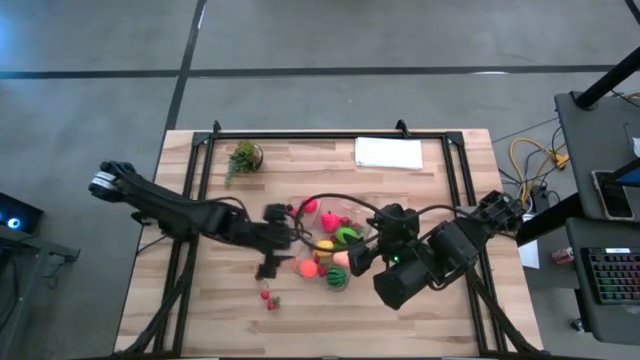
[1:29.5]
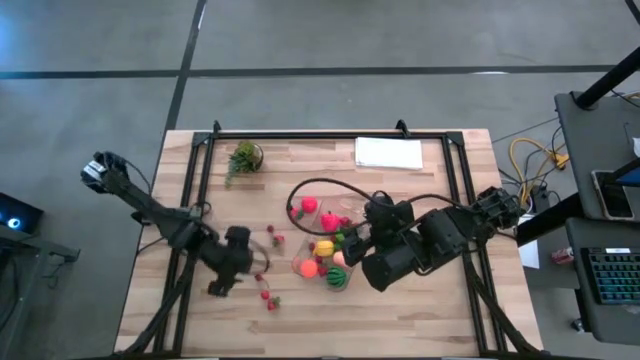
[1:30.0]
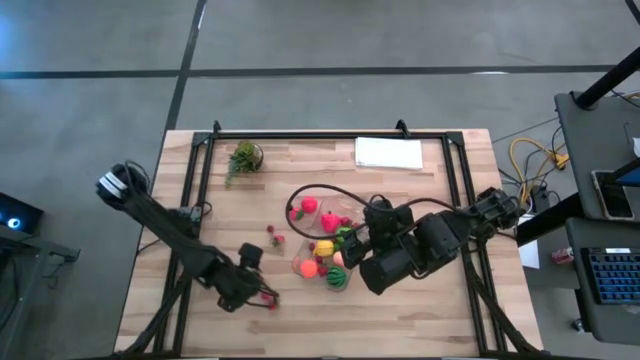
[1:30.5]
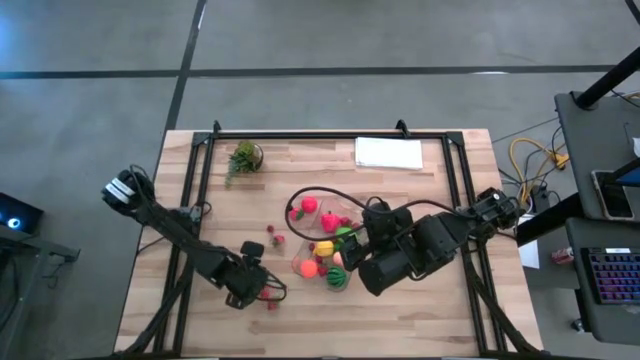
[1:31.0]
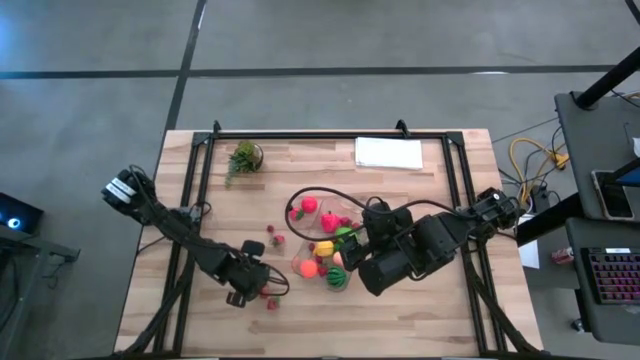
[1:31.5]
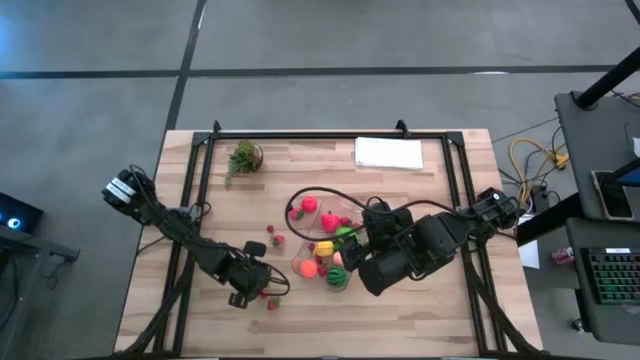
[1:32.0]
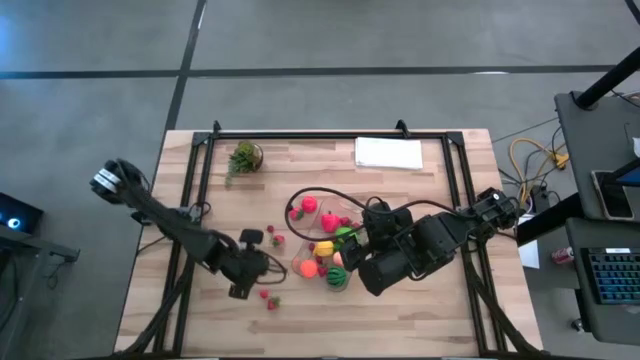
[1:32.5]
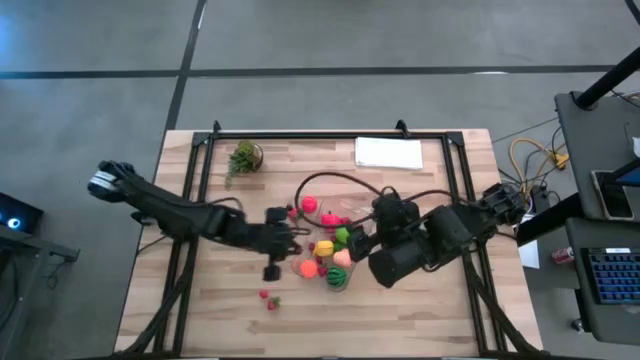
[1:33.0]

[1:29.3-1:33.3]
Task: Pick and placing Produce into tupperware
Put the red cherry into the transparent bin

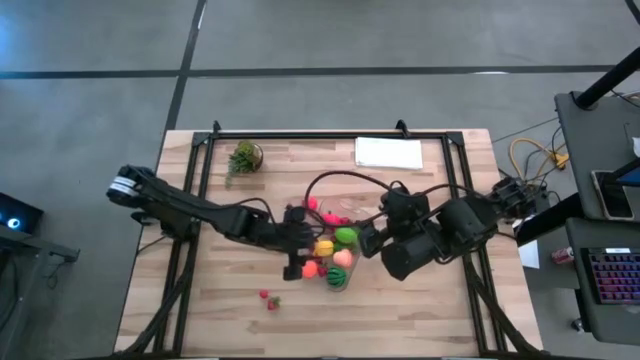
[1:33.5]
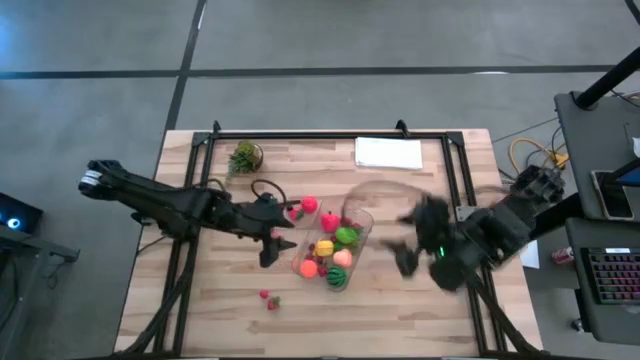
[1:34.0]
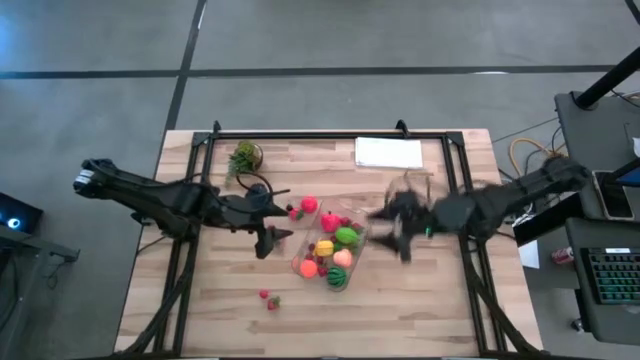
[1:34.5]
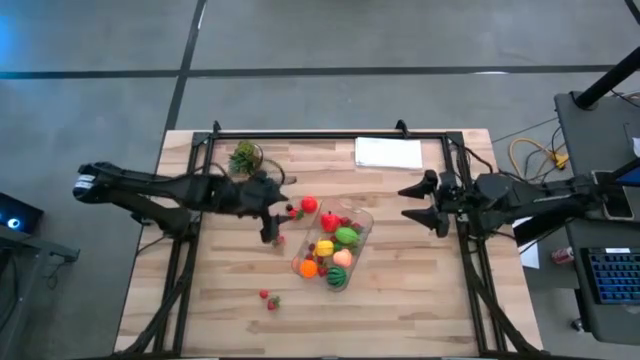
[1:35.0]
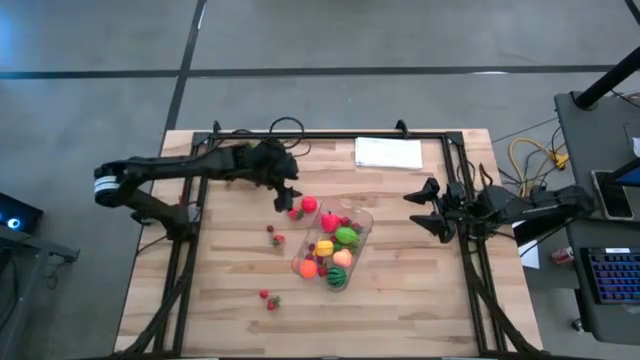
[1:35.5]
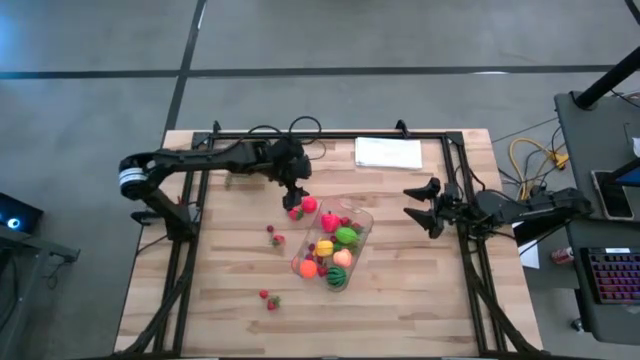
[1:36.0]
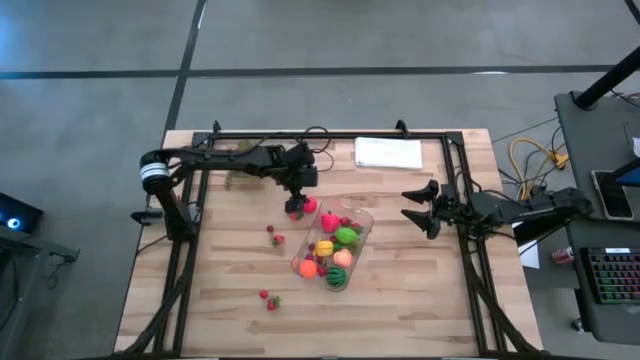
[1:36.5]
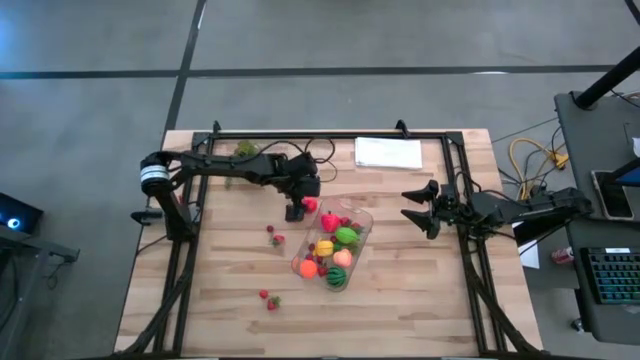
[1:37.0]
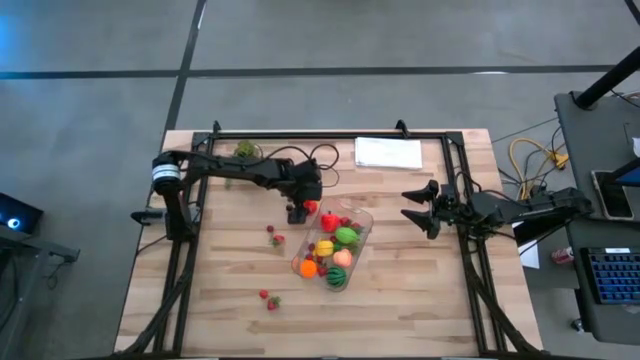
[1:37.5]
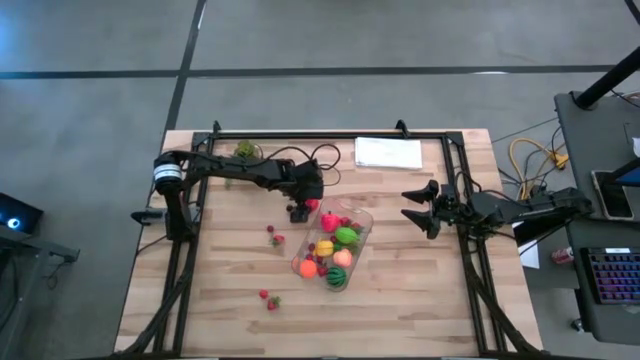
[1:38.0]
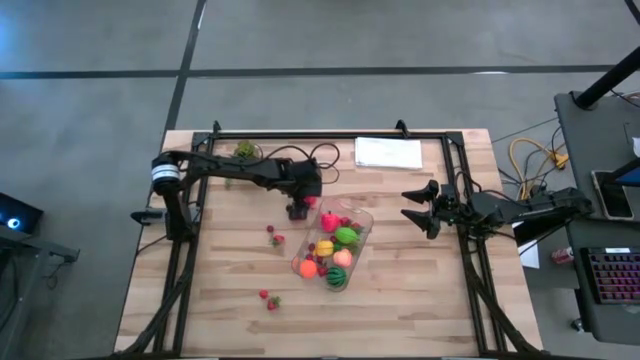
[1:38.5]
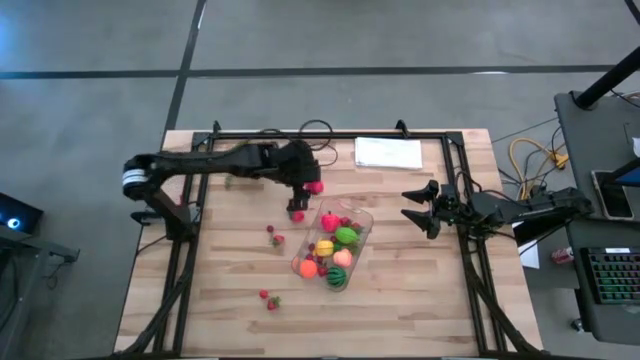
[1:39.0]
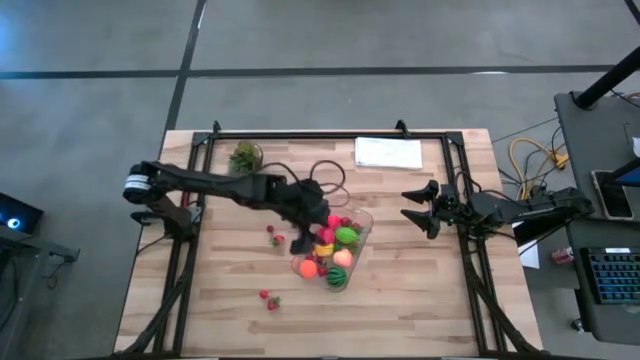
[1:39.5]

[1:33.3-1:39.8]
Put the red tomato into the transparent bin

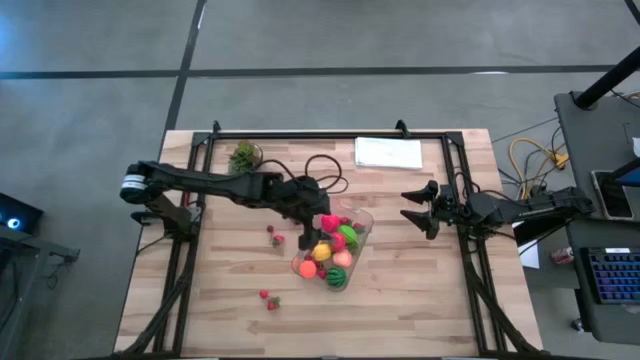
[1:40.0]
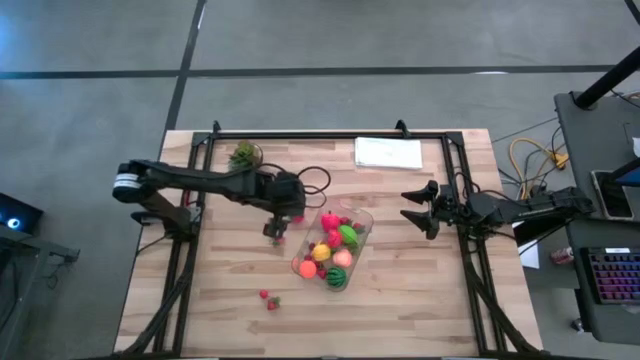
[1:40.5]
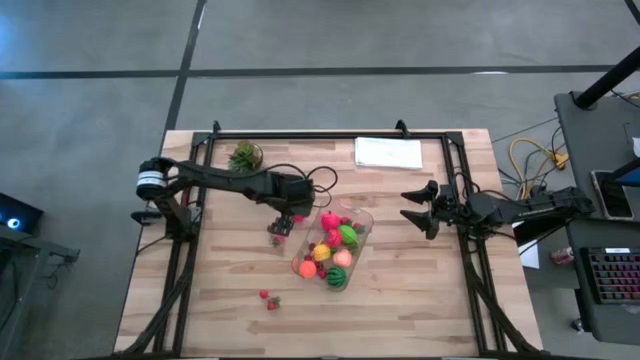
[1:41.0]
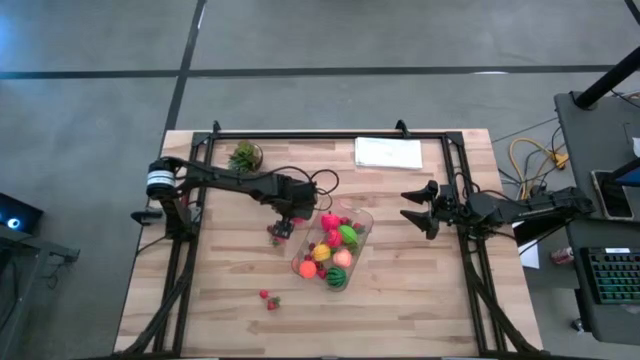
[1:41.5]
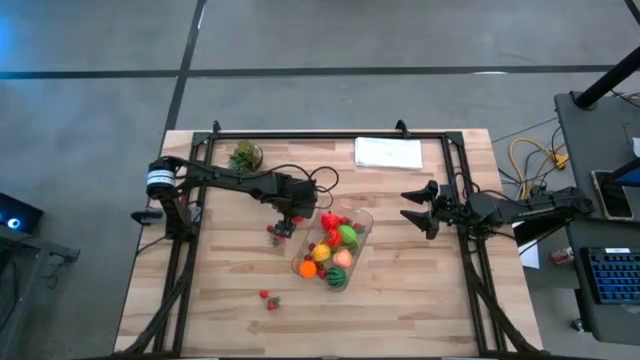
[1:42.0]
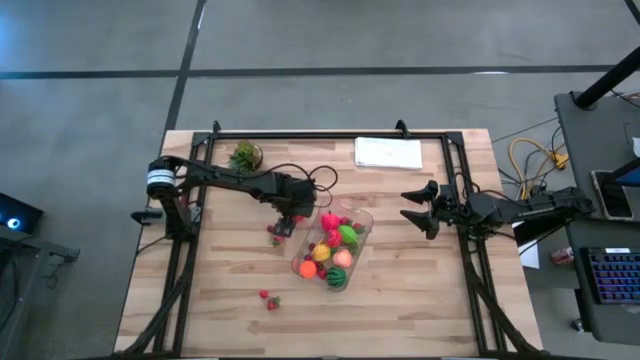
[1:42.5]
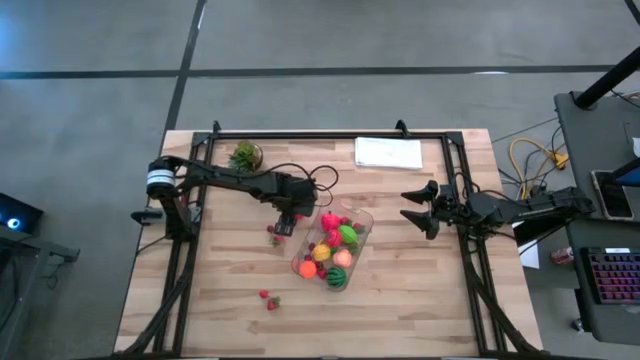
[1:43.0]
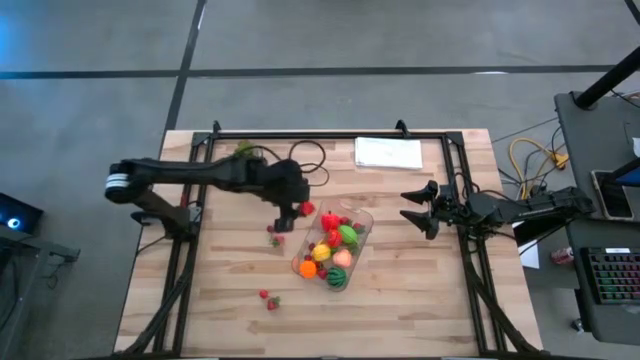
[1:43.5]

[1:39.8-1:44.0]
Put the red strawberry into the transparent bin

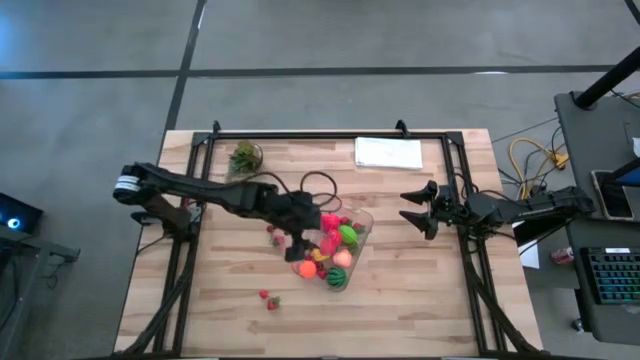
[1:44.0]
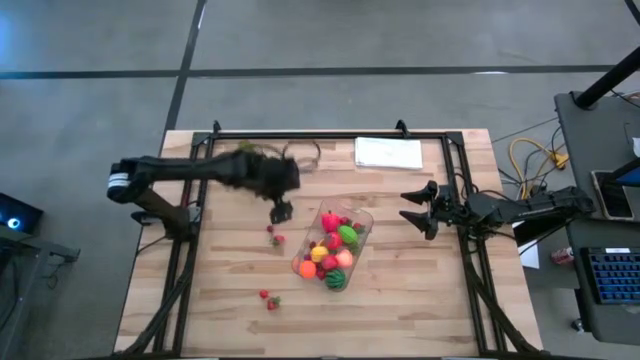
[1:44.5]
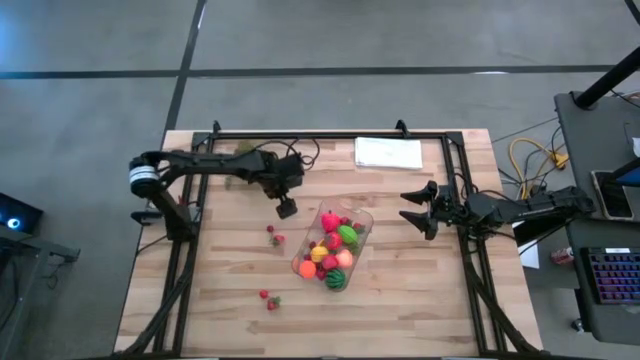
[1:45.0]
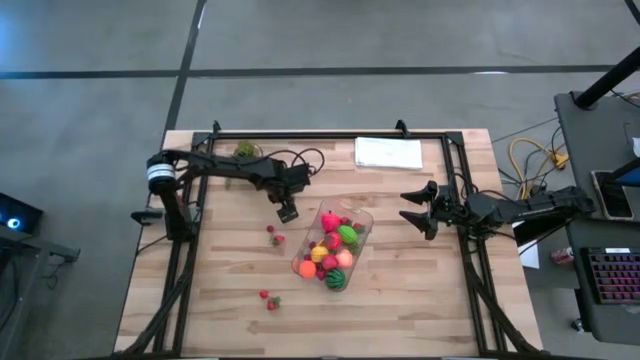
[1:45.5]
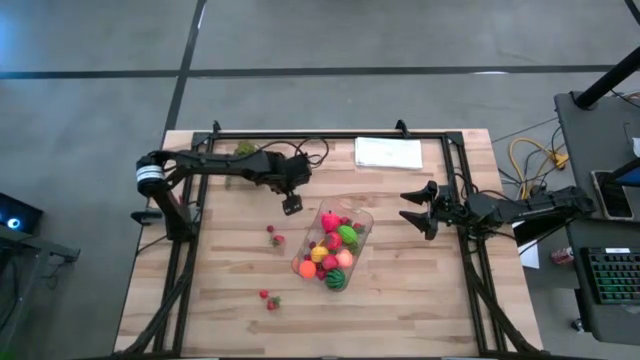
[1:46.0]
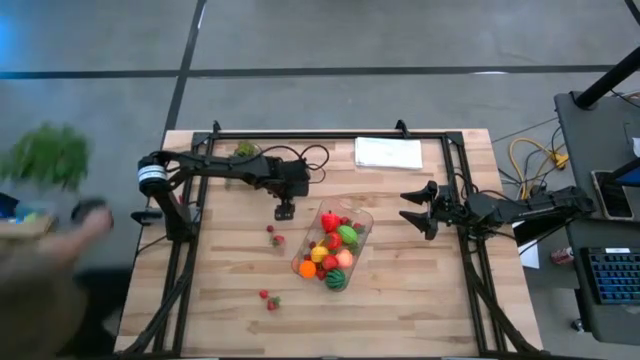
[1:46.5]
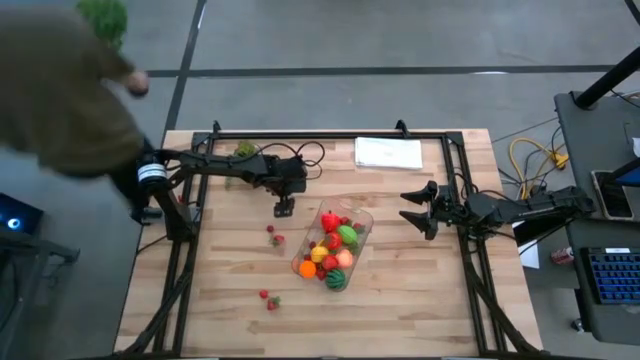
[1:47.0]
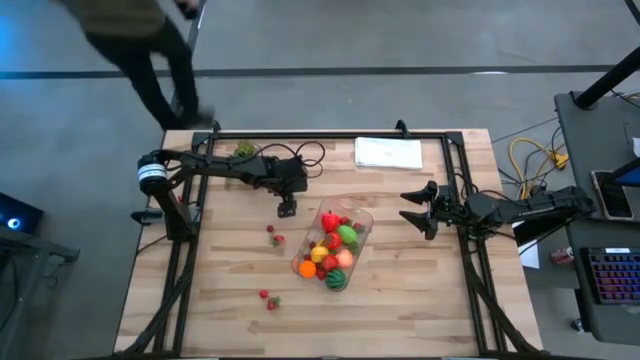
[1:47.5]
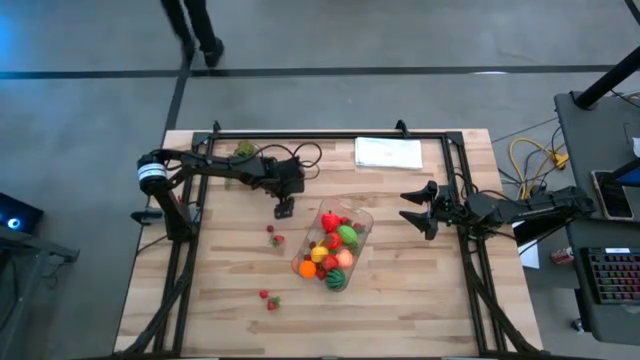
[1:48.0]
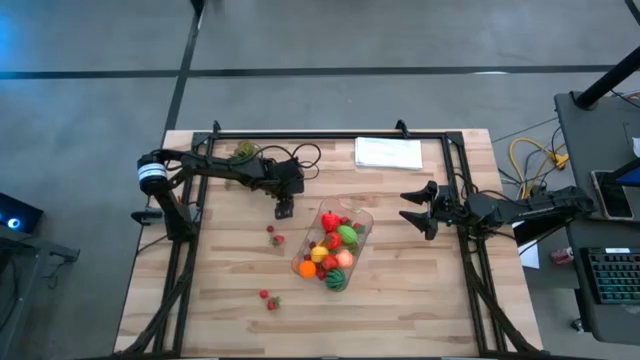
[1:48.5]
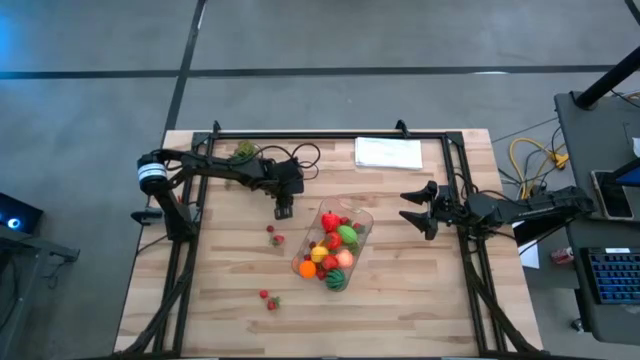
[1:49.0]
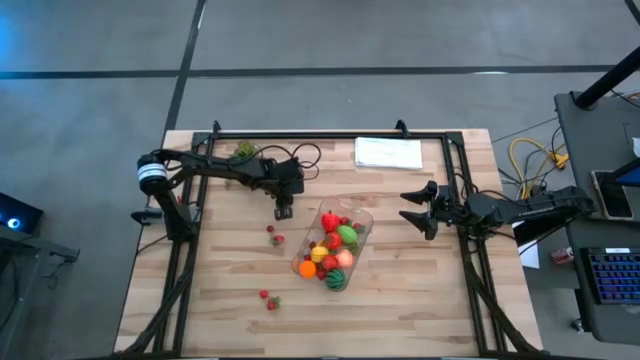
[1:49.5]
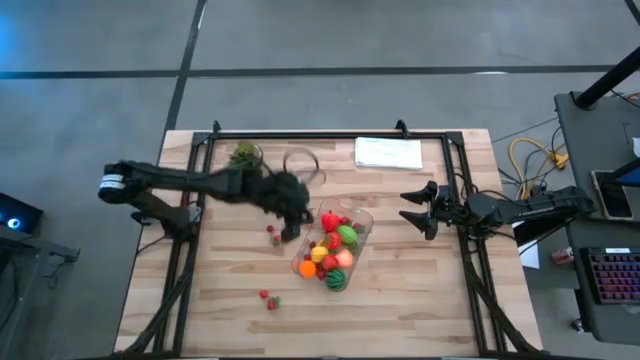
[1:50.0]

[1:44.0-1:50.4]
Put the black cherry into the transparent bin
